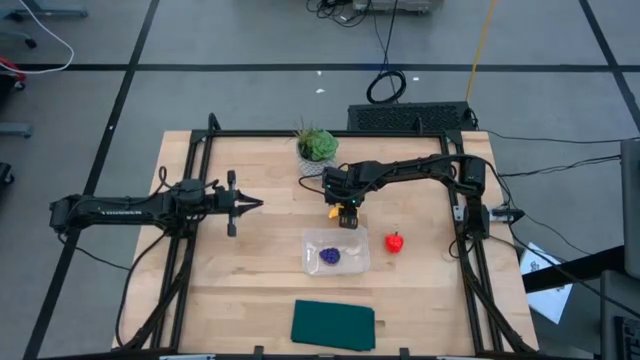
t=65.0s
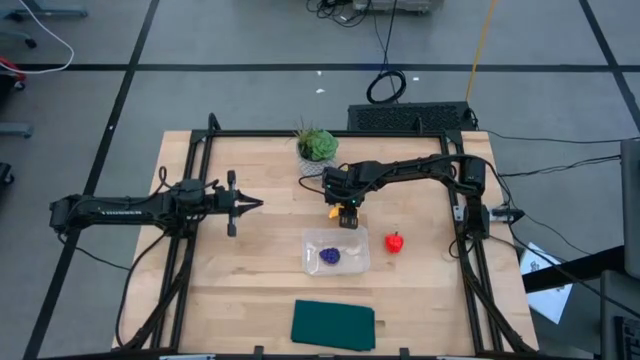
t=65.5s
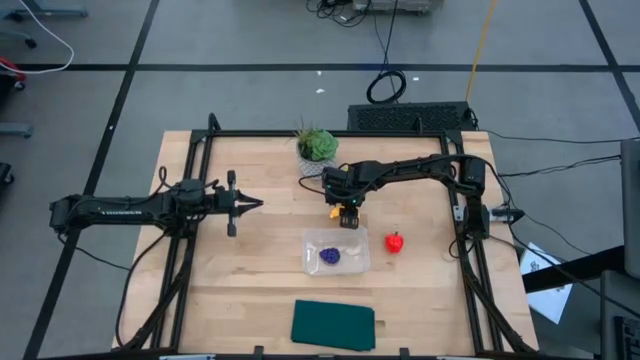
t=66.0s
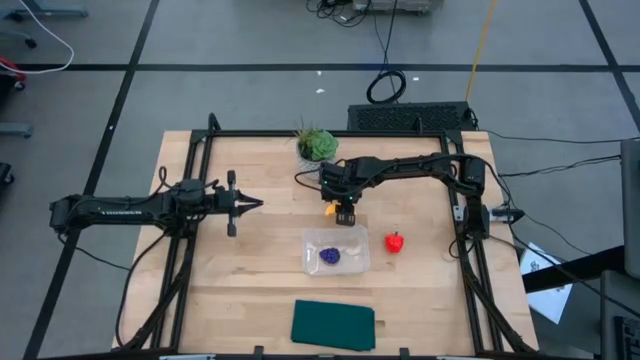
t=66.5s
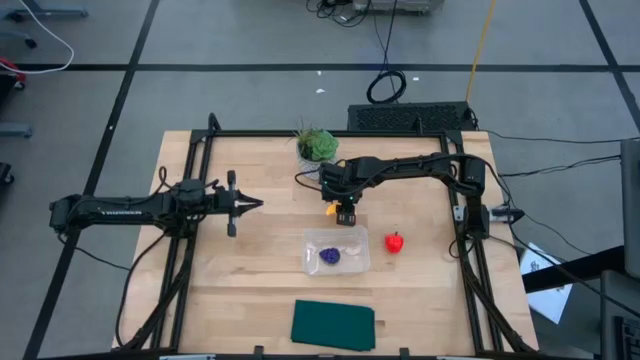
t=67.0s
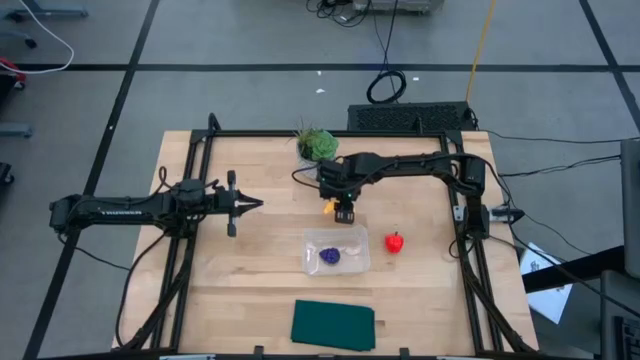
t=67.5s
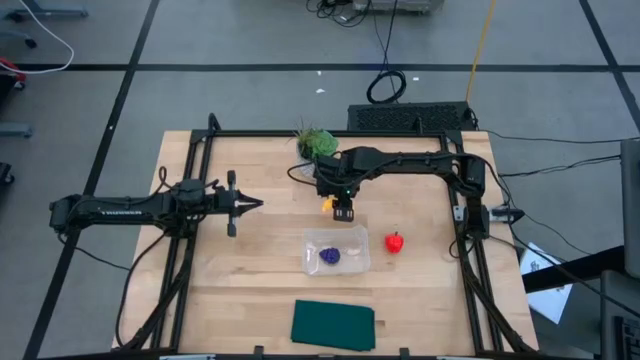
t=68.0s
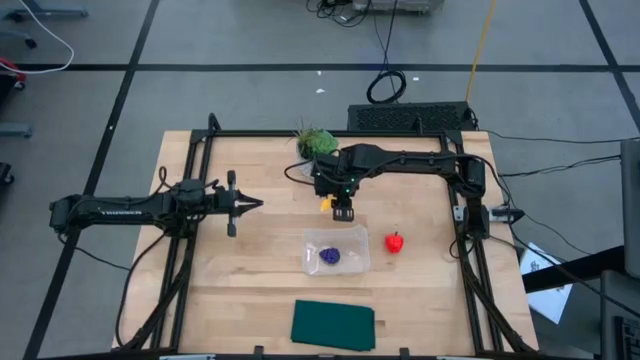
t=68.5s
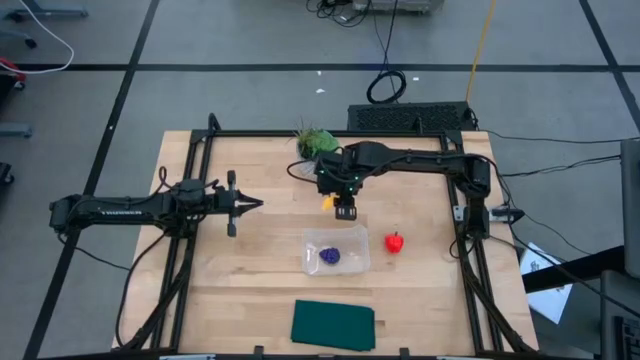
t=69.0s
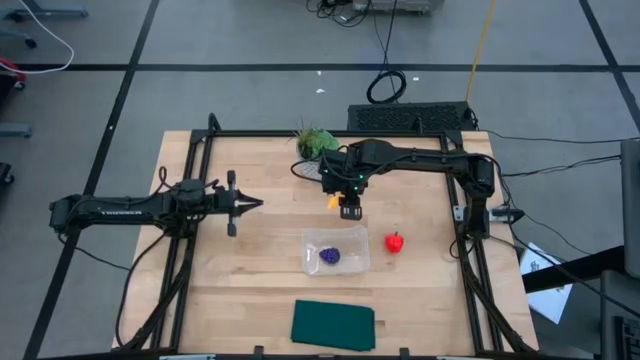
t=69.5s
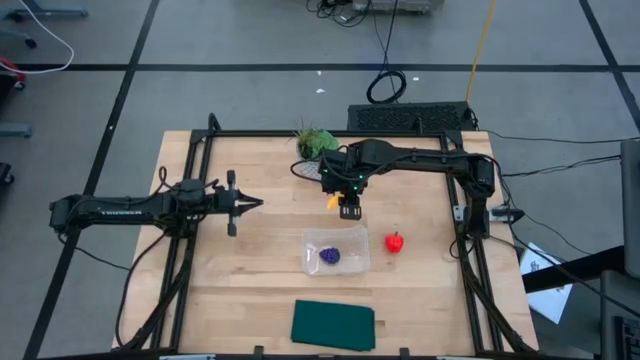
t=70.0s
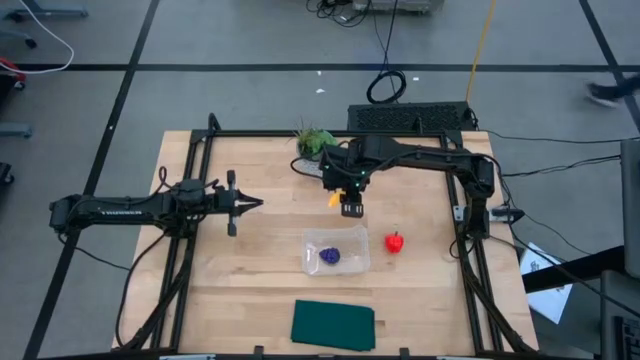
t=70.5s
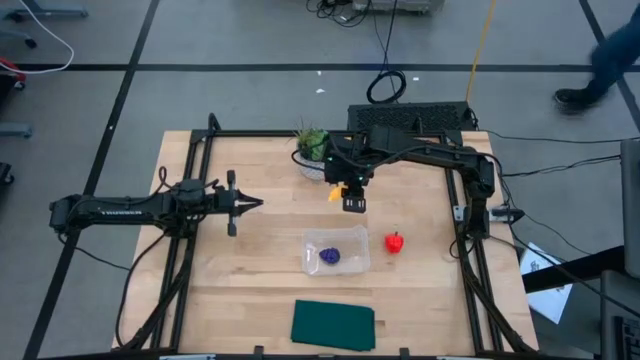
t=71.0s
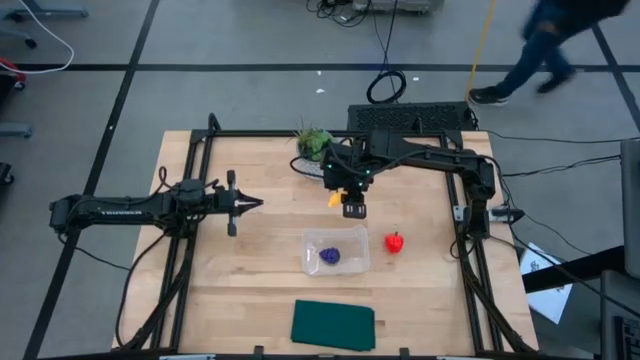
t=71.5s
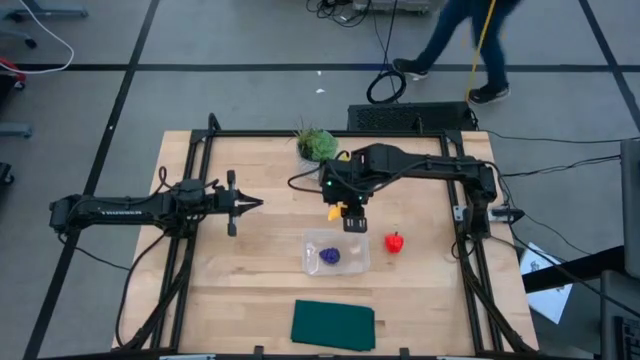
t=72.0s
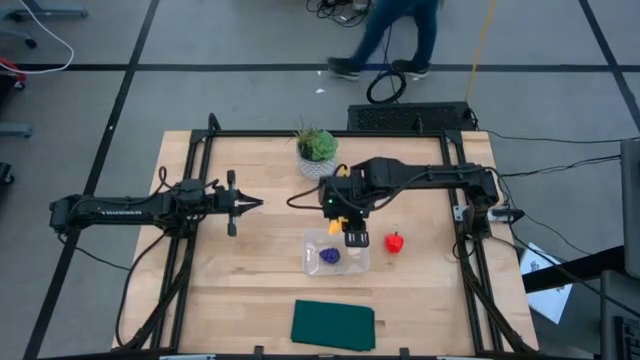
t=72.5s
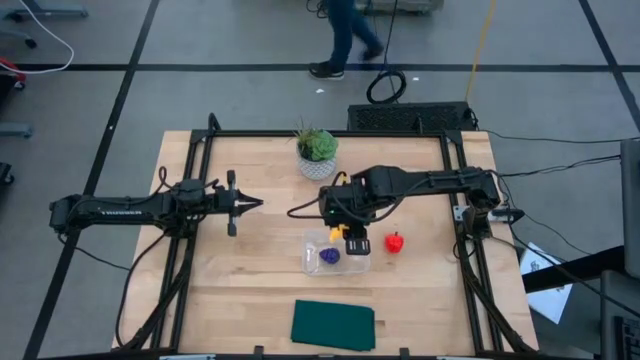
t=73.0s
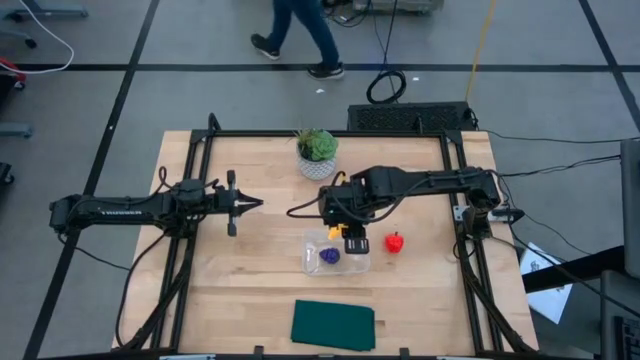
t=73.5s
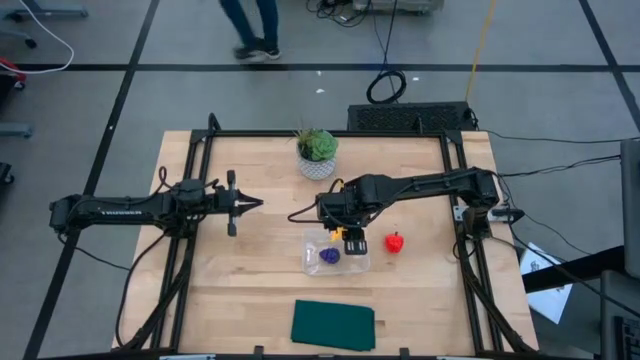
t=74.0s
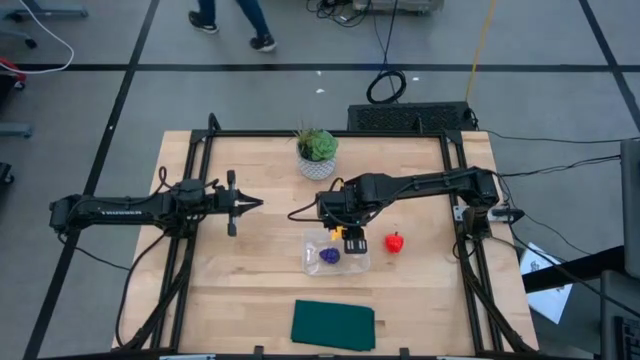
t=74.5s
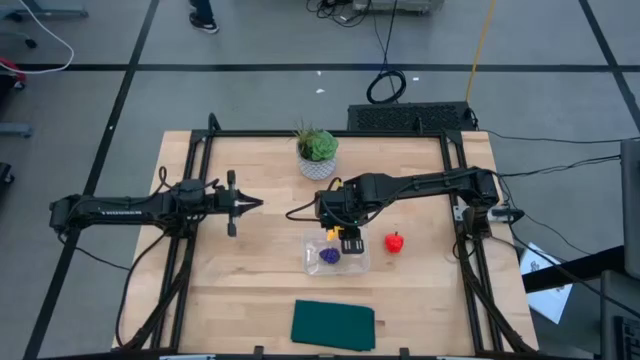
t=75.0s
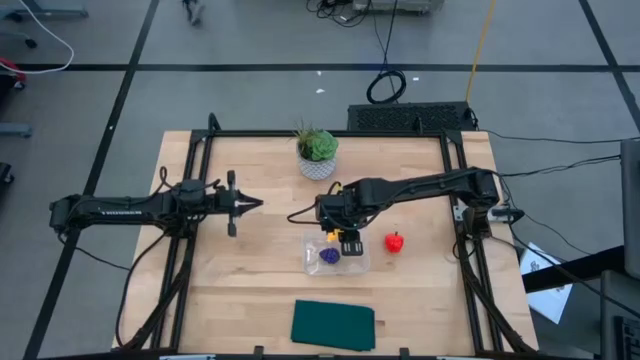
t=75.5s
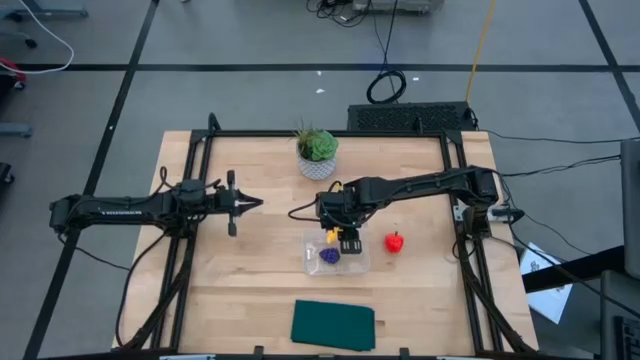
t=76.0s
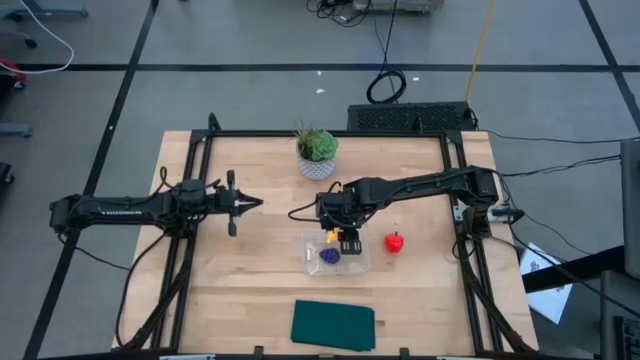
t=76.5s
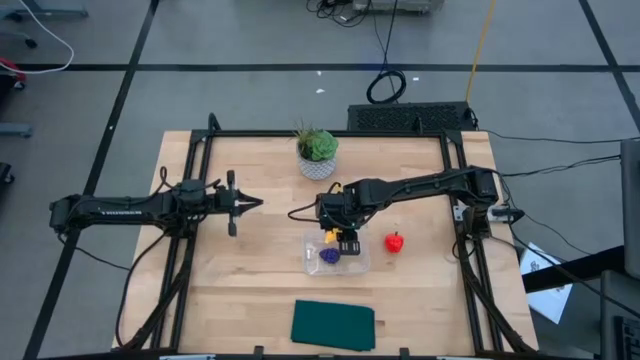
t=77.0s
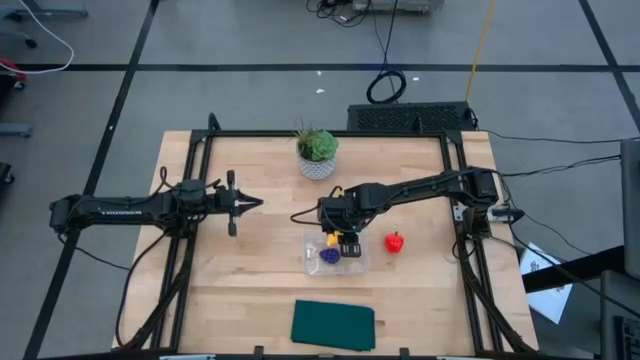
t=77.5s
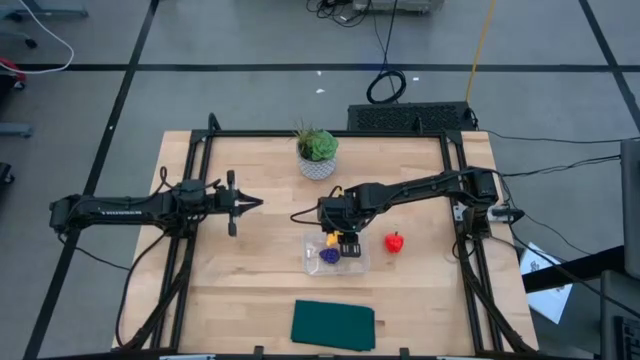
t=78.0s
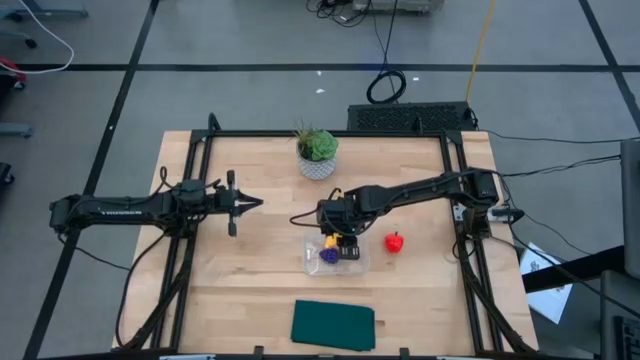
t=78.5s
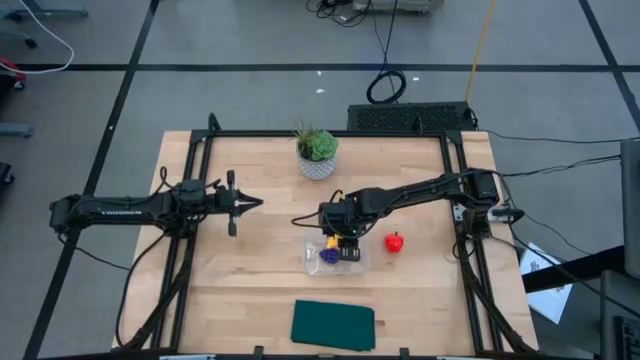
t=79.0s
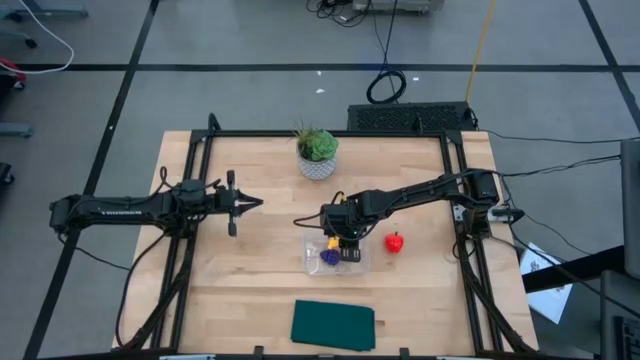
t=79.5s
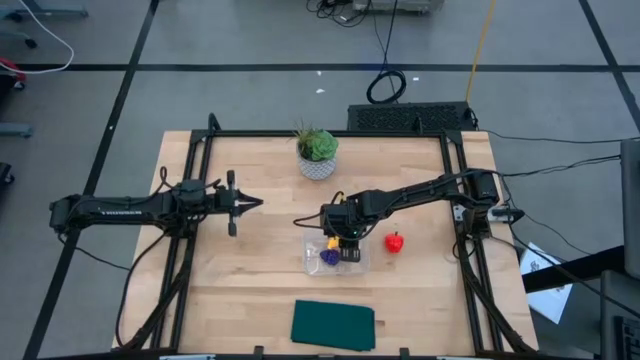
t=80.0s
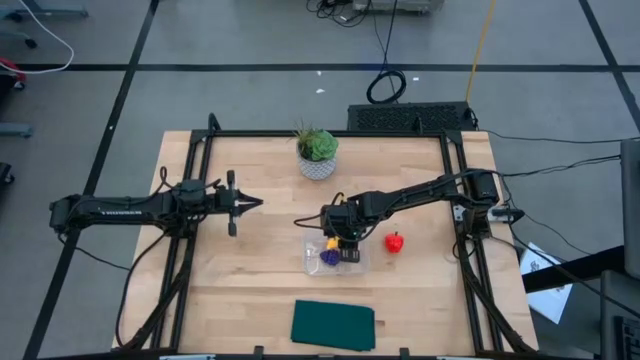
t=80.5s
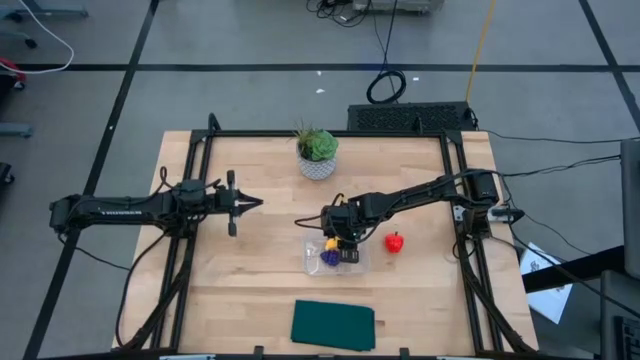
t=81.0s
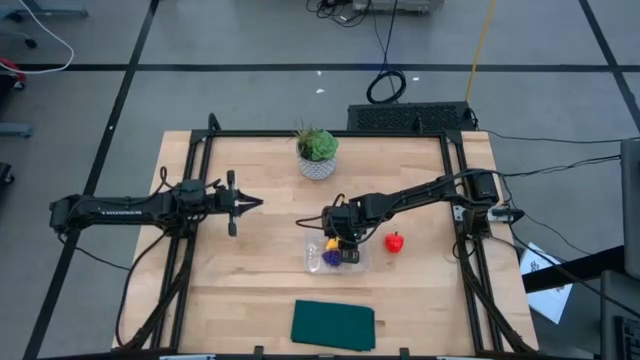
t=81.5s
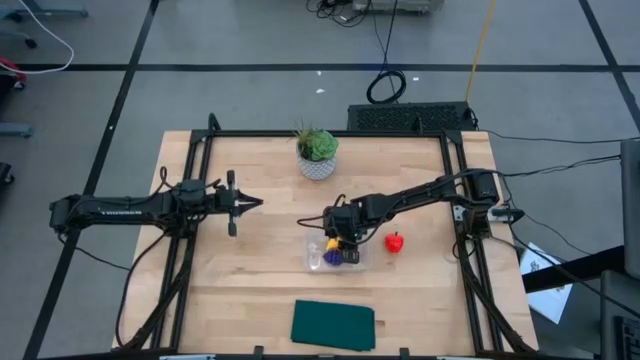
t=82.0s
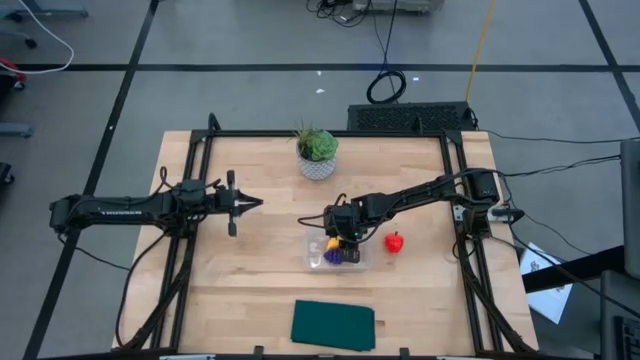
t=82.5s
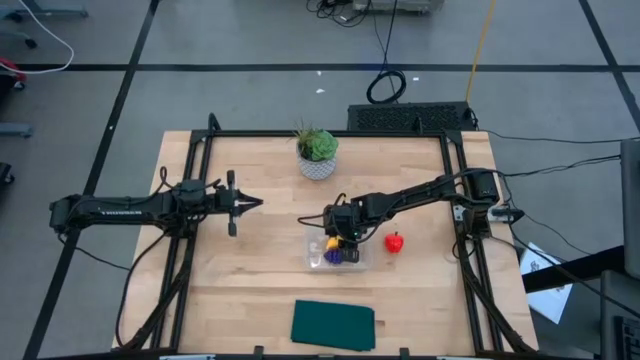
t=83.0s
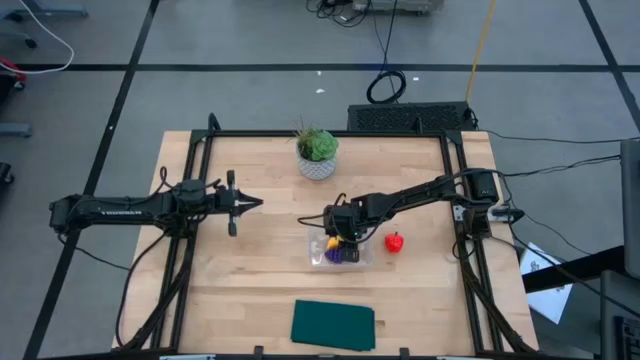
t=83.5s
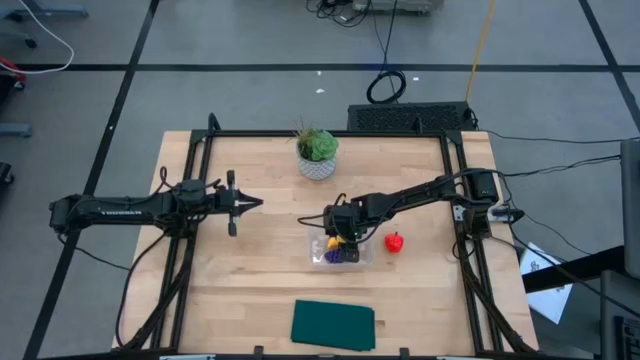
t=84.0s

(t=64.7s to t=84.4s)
Task: Pick and placing Produce into tupperware
Put the banana into the transparent bin
